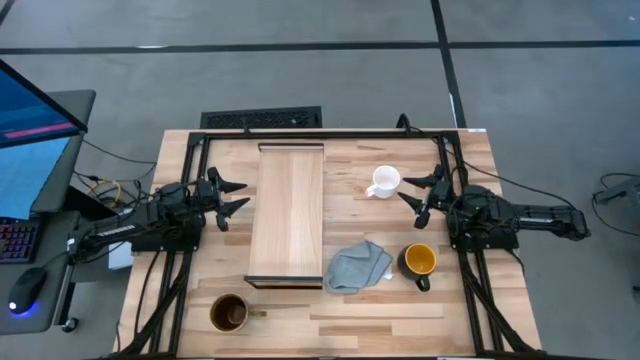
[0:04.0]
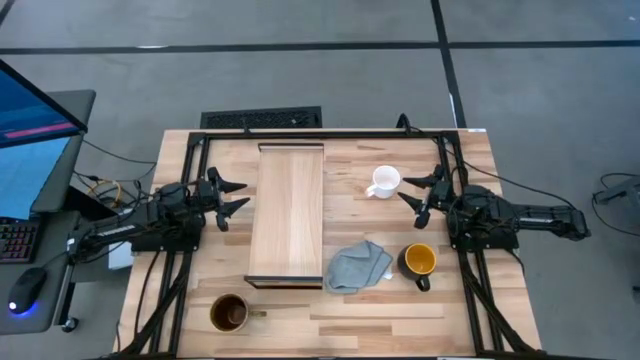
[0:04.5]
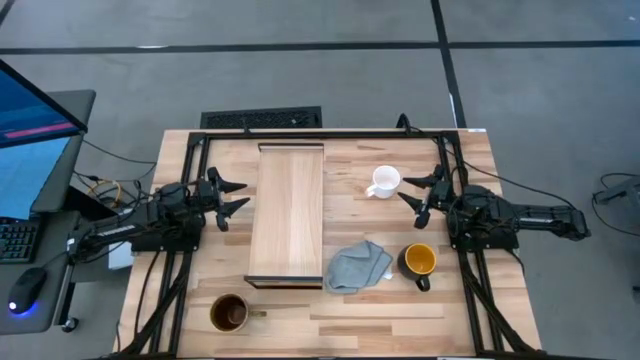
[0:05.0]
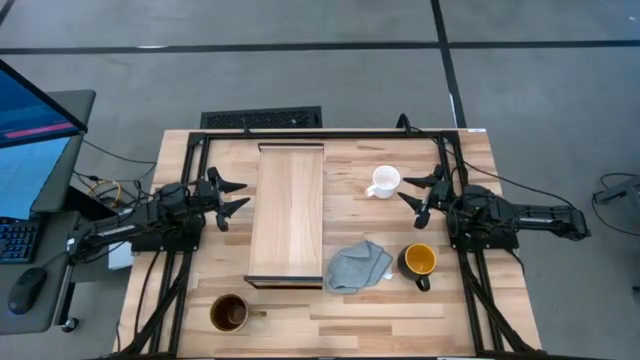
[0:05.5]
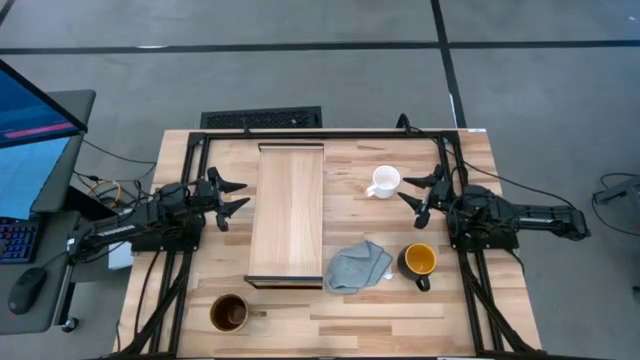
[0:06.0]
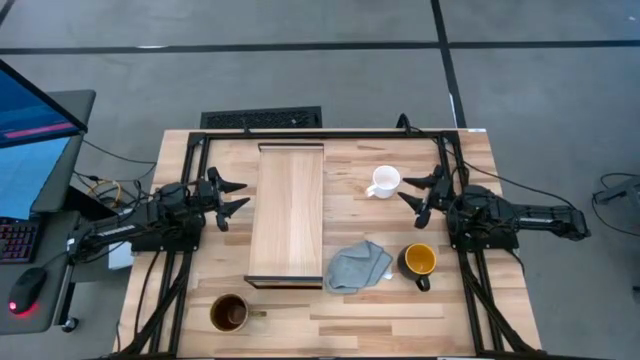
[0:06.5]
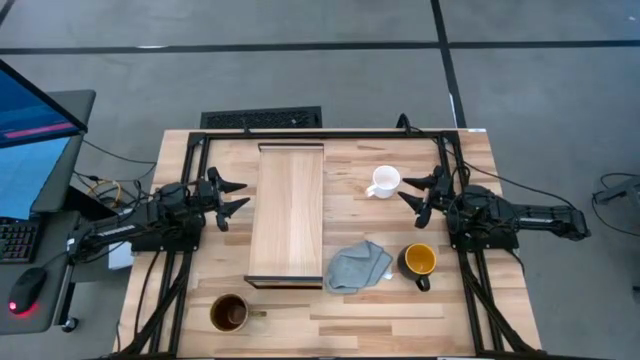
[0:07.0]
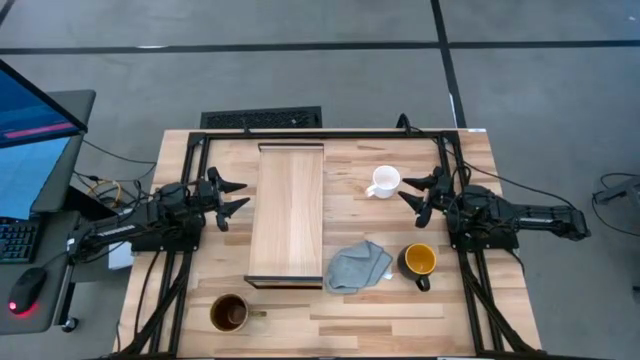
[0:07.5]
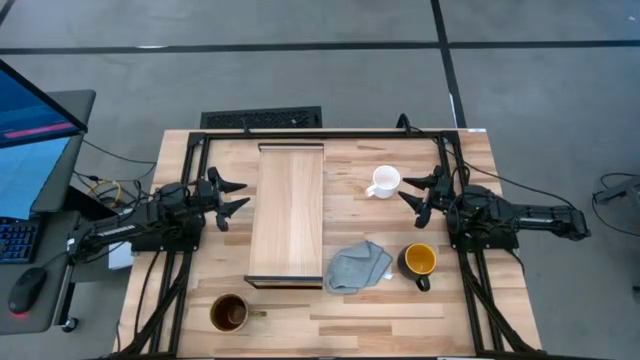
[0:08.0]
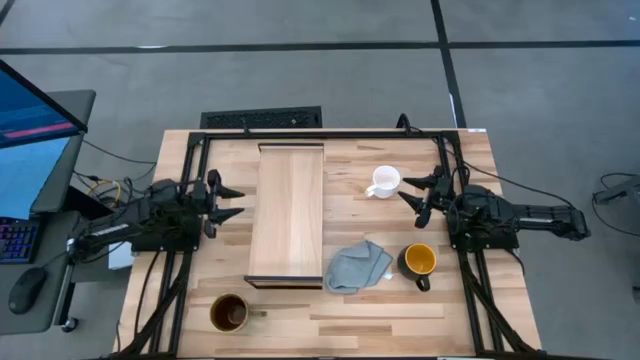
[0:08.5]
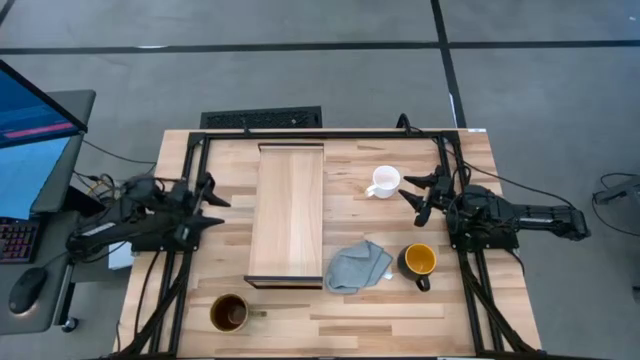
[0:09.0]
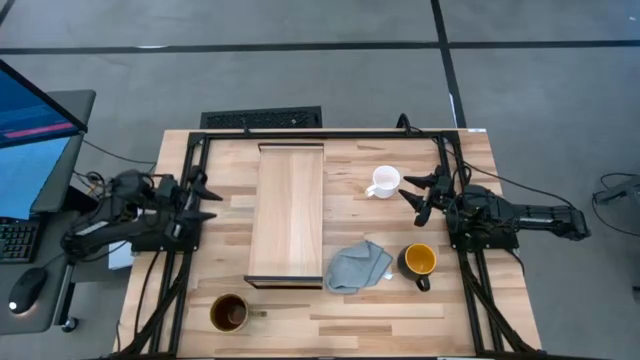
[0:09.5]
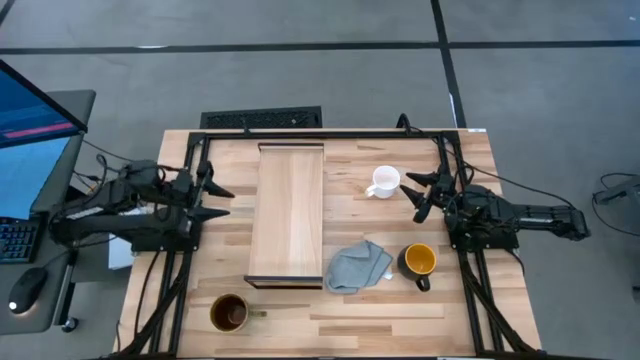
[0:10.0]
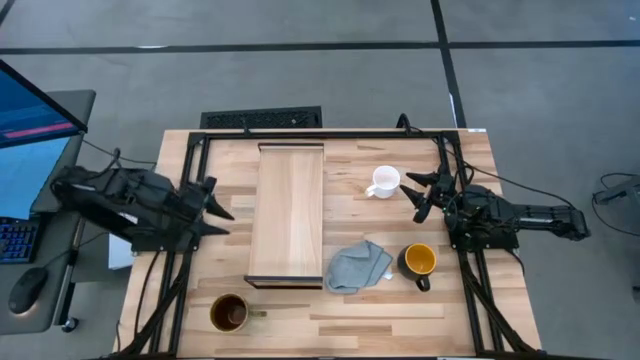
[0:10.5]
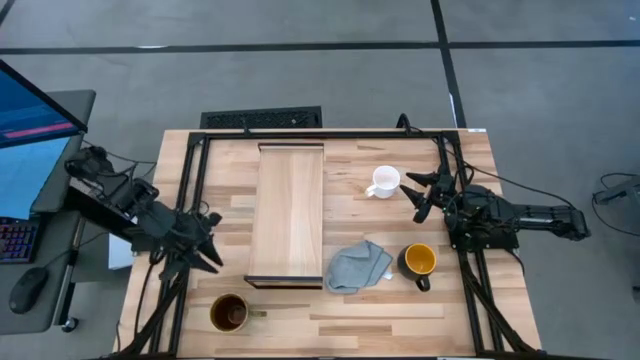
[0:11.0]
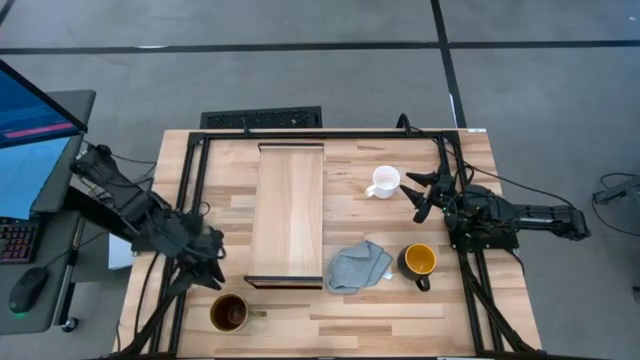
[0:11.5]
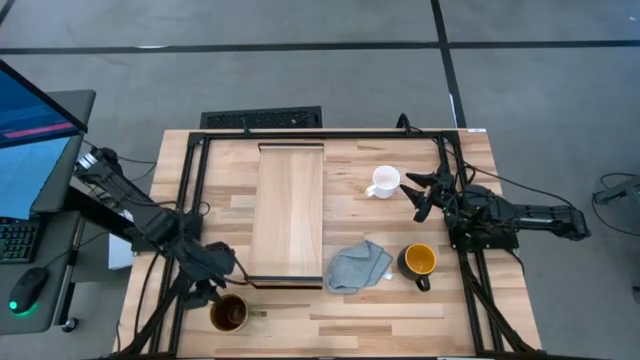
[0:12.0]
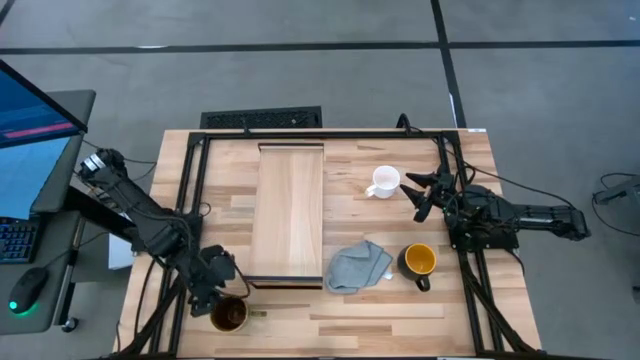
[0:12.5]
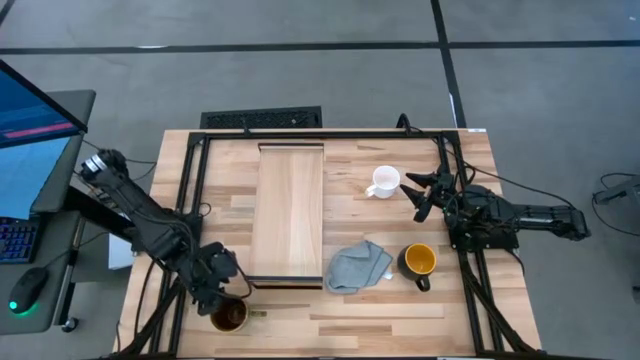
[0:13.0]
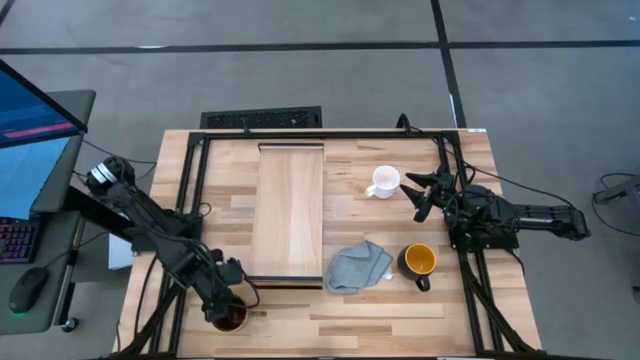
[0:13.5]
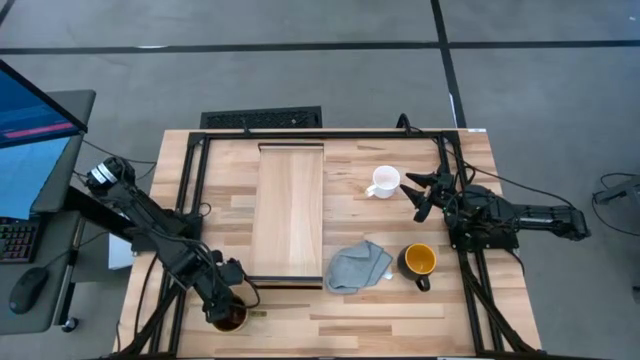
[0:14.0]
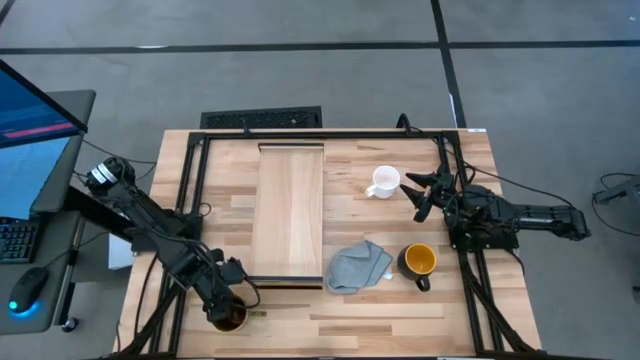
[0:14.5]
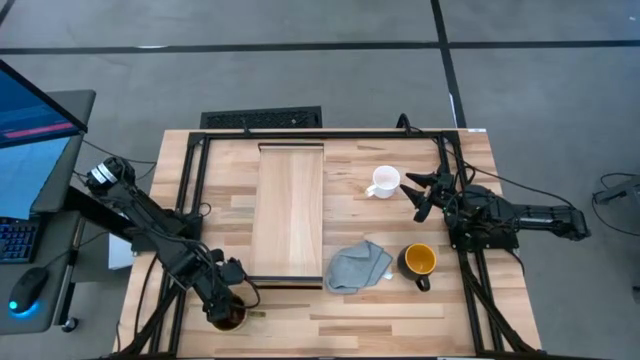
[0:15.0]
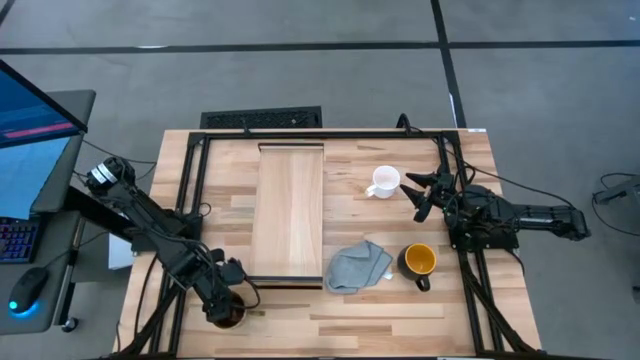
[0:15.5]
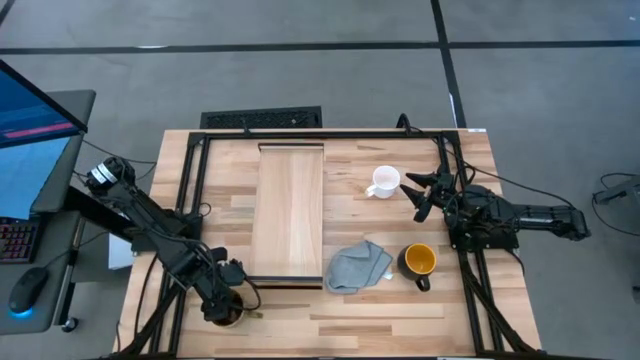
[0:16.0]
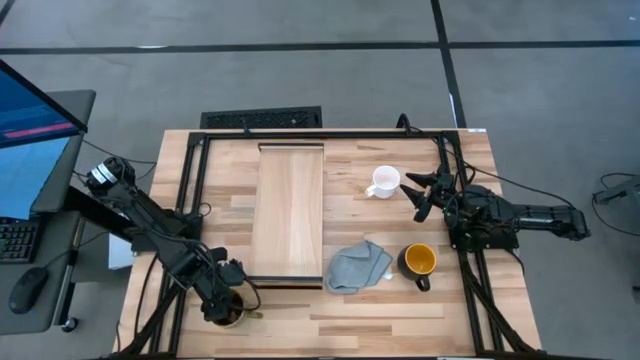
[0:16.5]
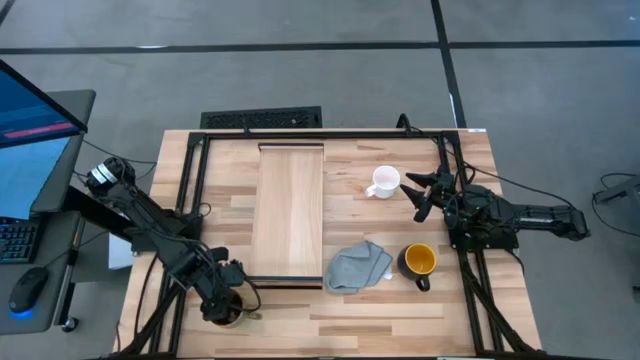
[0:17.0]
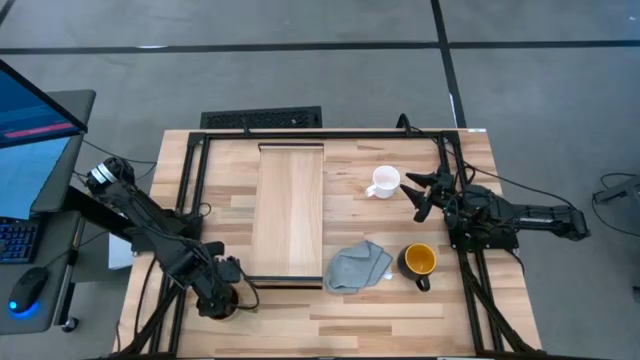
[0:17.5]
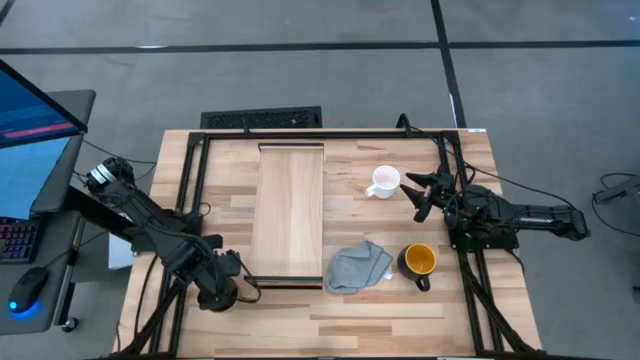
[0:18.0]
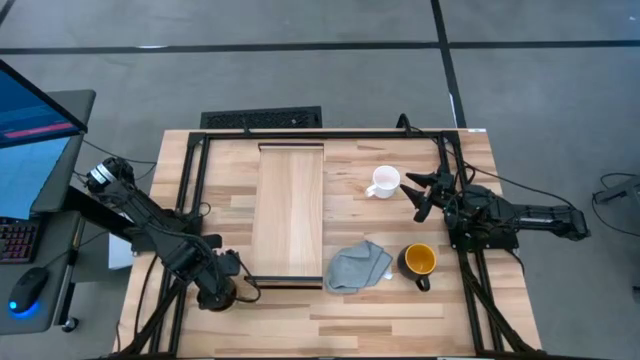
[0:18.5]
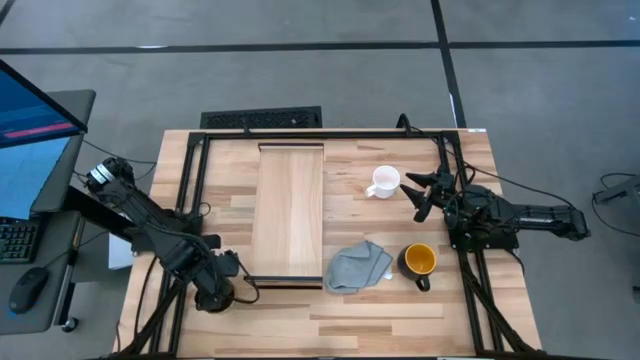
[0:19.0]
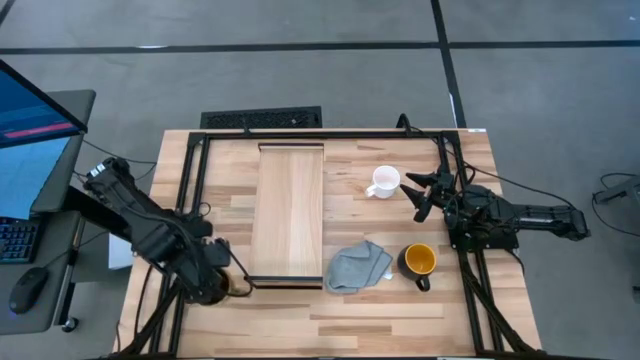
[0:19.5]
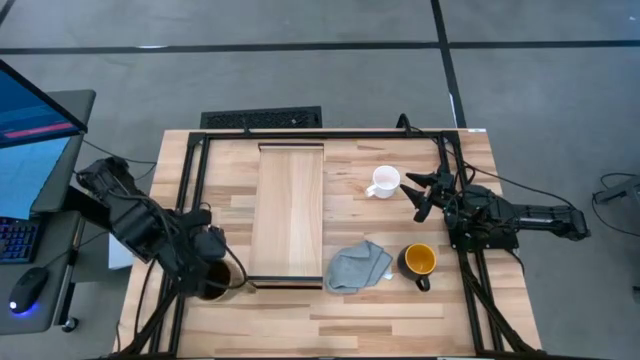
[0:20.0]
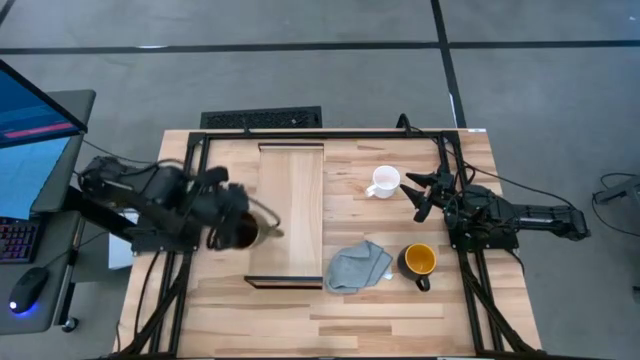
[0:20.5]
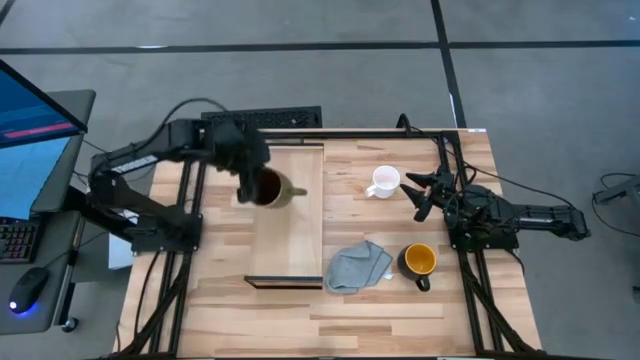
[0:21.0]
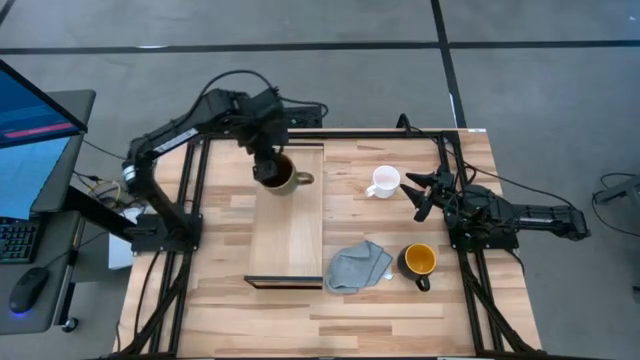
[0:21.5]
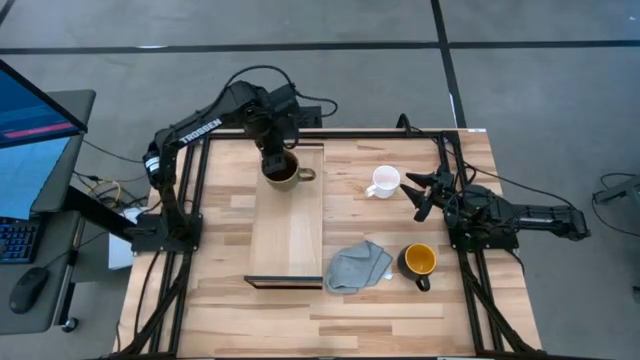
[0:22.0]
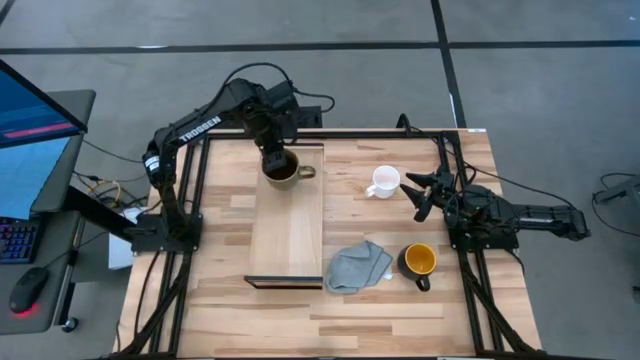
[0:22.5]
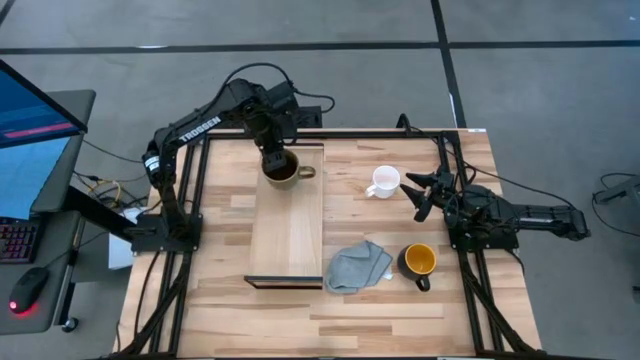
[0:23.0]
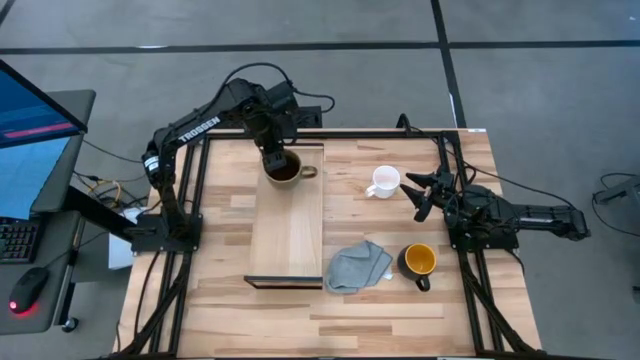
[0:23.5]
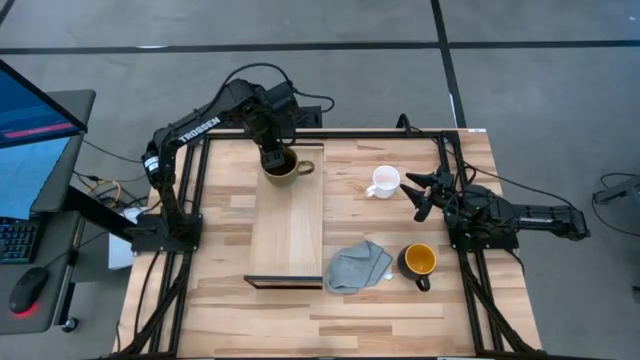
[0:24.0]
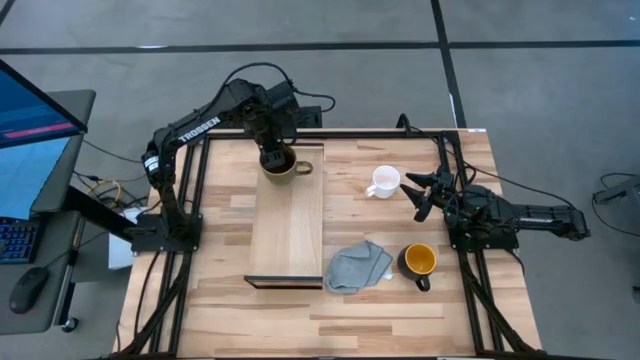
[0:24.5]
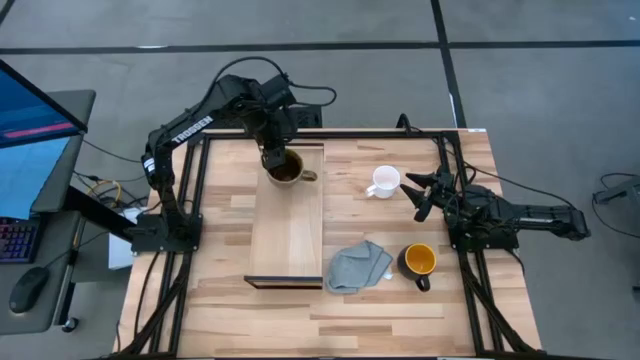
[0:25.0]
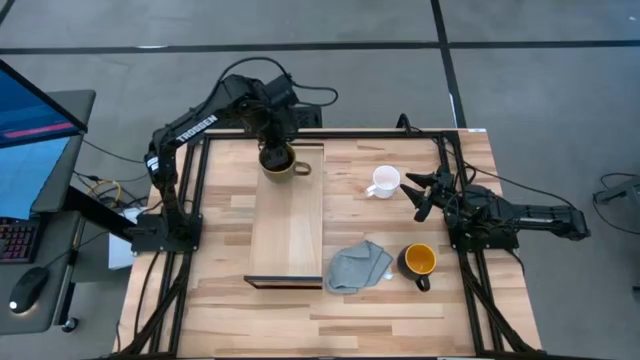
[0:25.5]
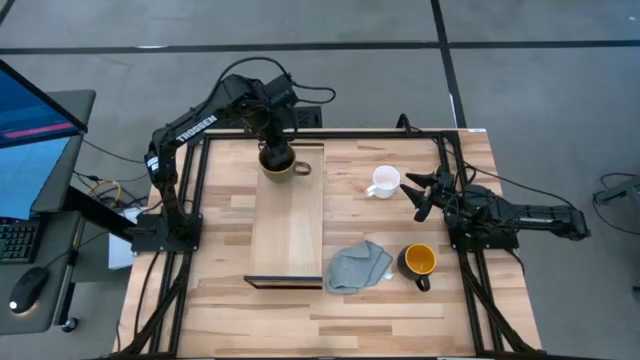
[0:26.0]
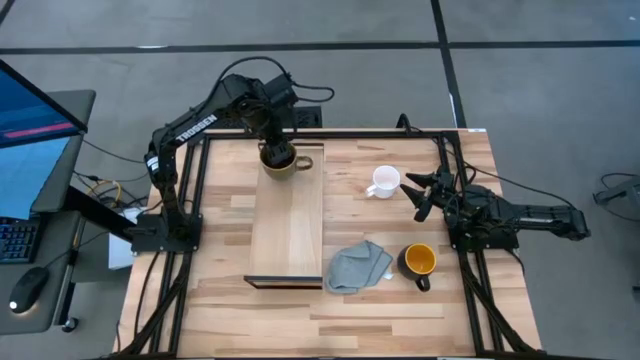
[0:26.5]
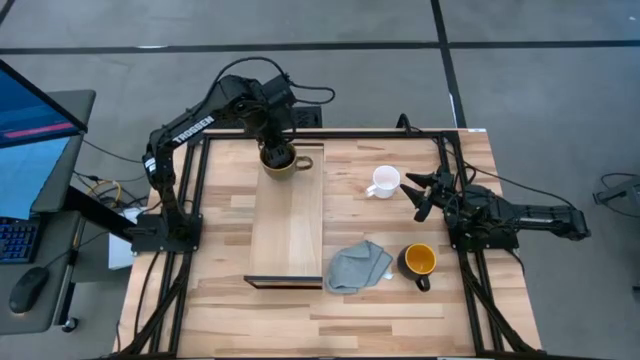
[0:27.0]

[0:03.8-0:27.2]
Task: Stack small to large cups/mugs on shelf
Put the green patterned mug on the shelf
